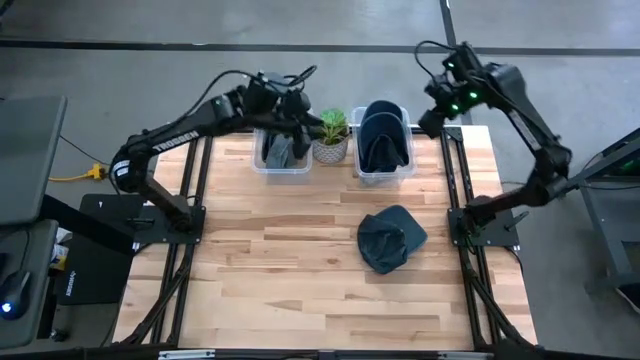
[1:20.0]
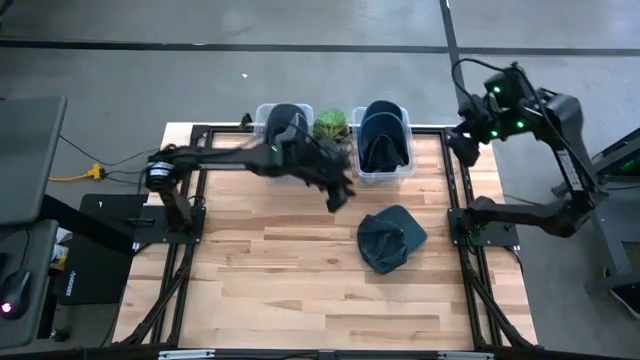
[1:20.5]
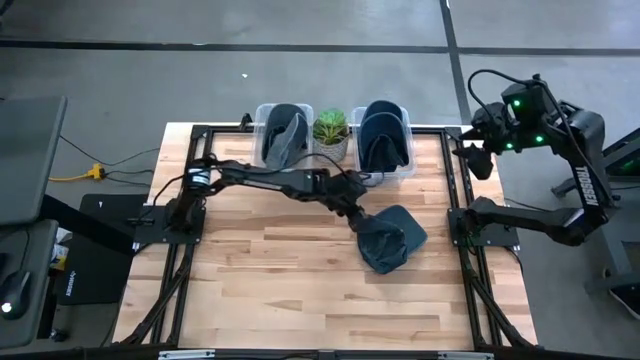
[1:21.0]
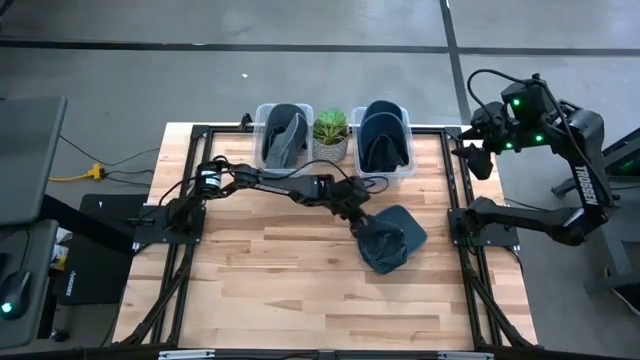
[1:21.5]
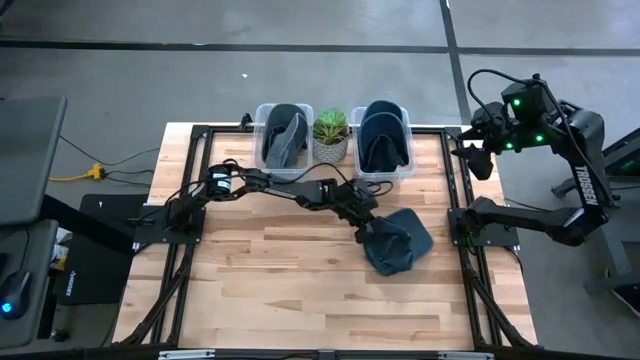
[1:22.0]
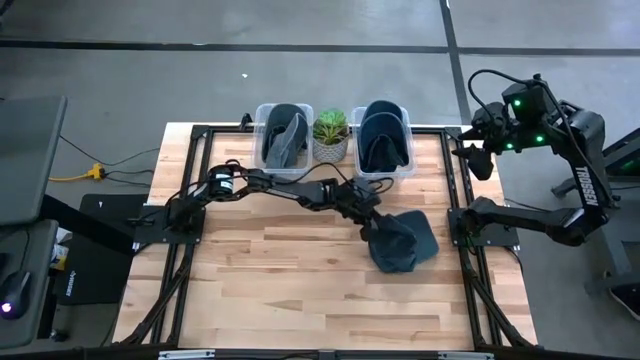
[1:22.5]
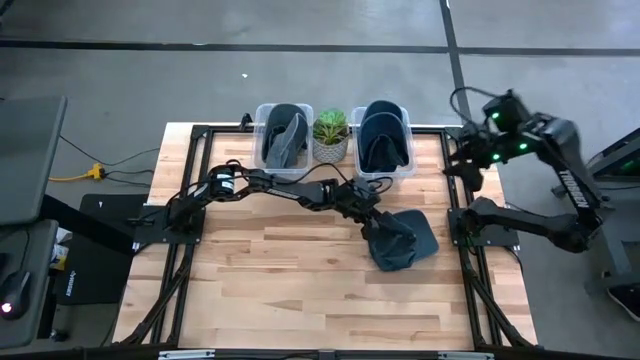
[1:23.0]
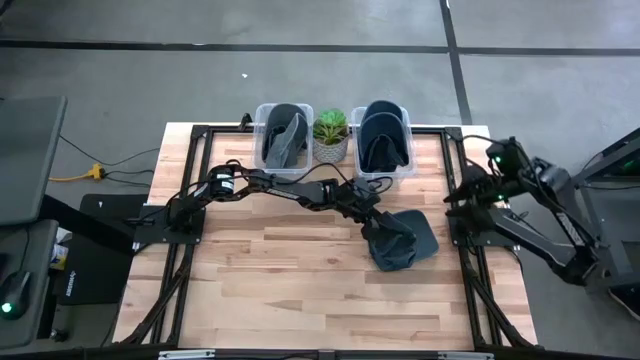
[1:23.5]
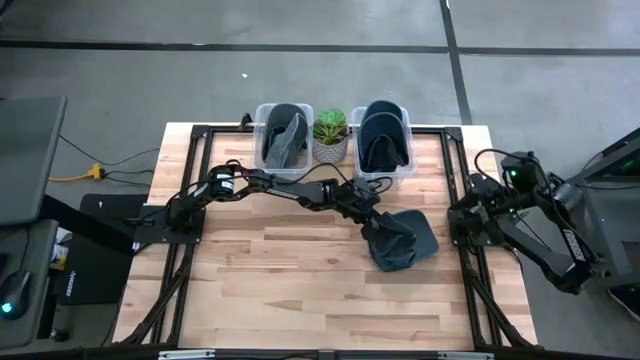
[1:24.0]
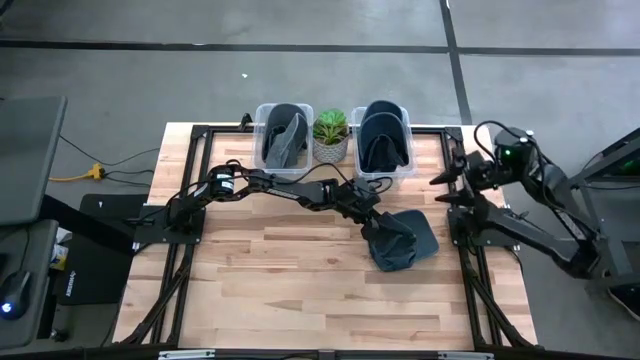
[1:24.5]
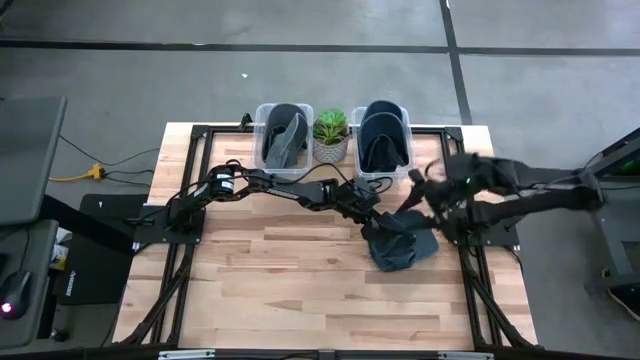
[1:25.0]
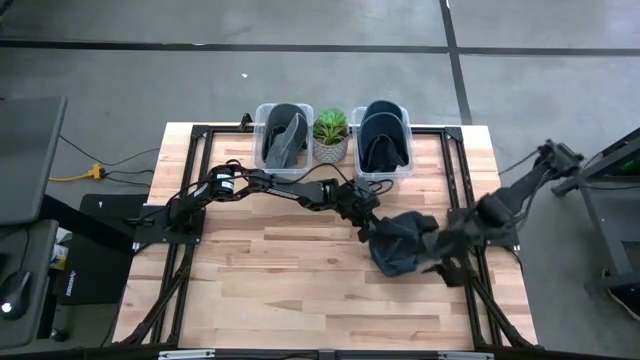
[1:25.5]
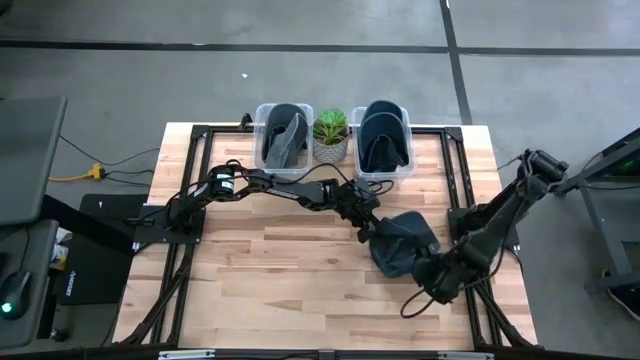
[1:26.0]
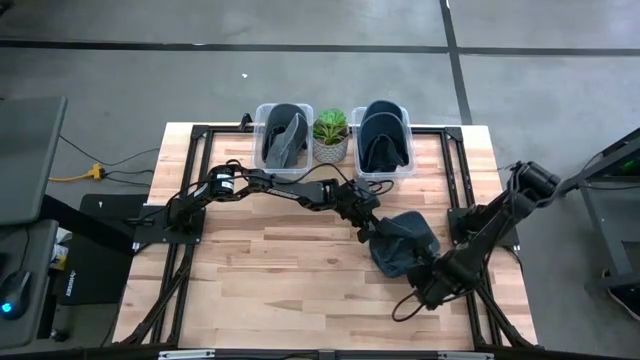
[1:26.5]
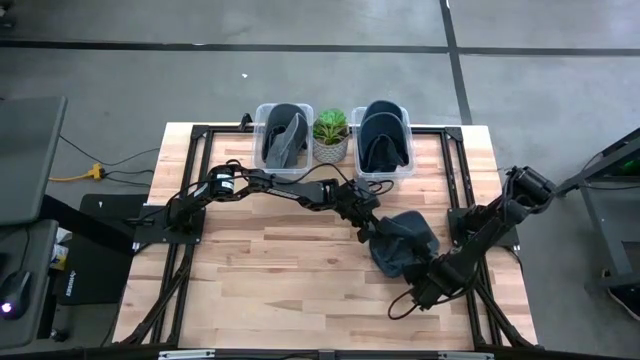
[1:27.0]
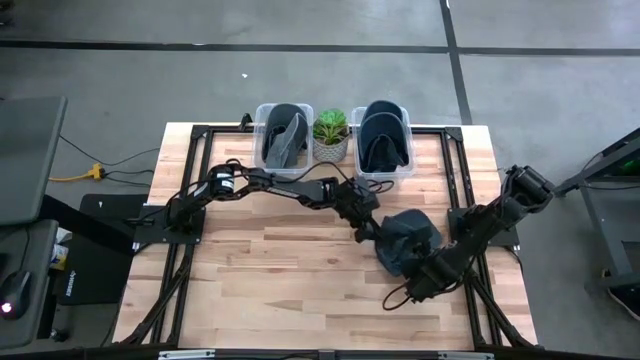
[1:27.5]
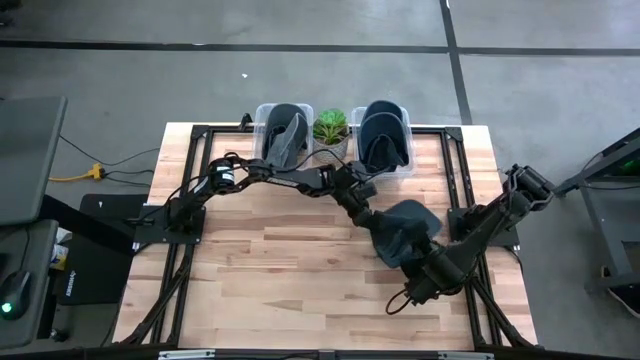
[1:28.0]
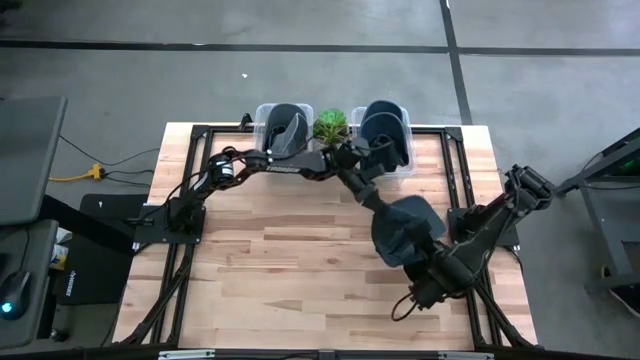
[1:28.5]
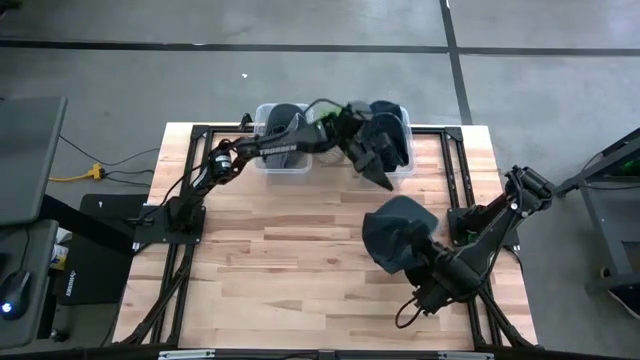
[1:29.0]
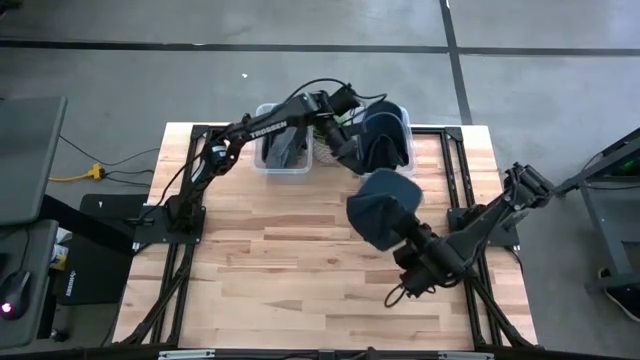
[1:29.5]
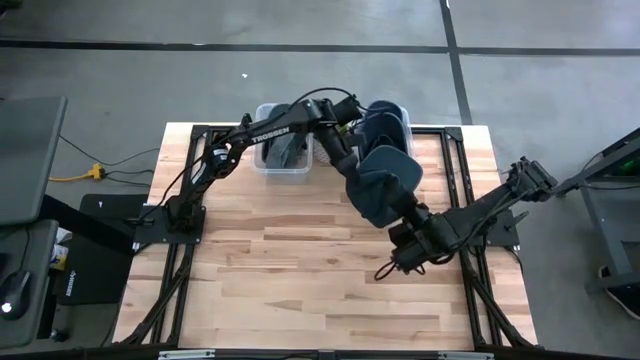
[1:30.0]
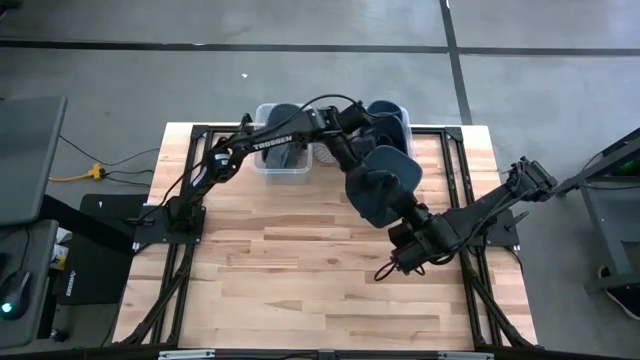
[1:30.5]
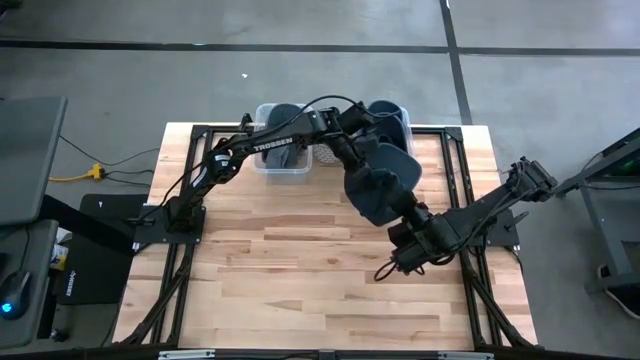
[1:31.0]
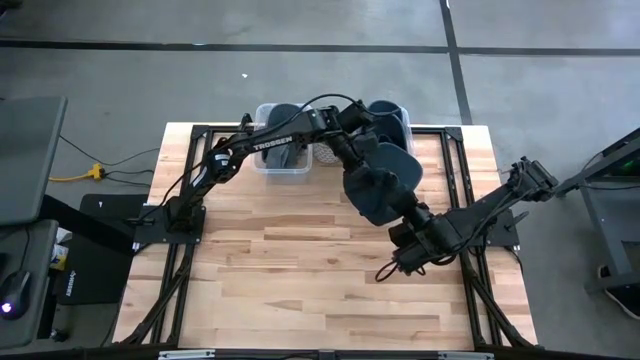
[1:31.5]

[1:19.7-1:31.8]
Task: Pick & Place hat
Put the blue cap into the right transparent bin

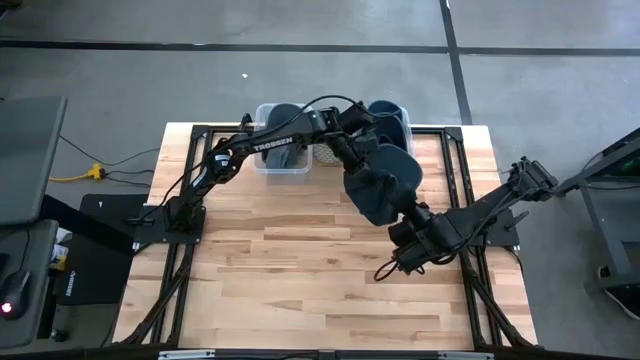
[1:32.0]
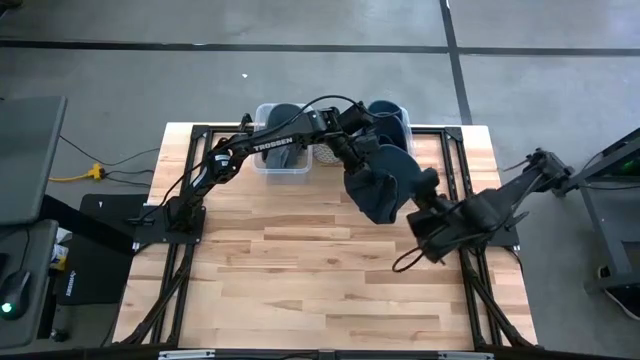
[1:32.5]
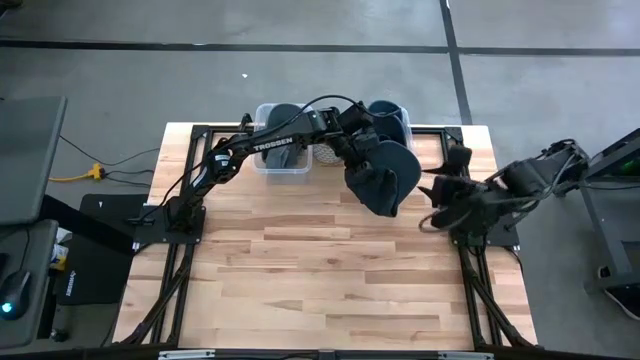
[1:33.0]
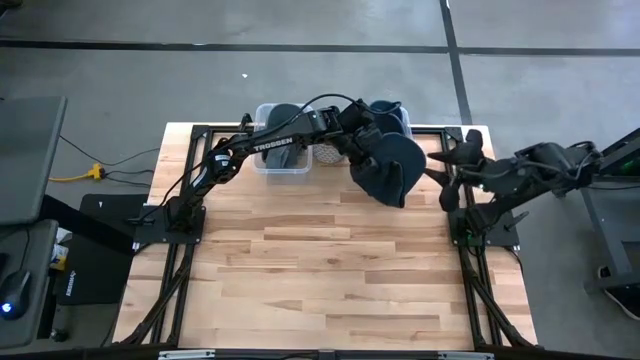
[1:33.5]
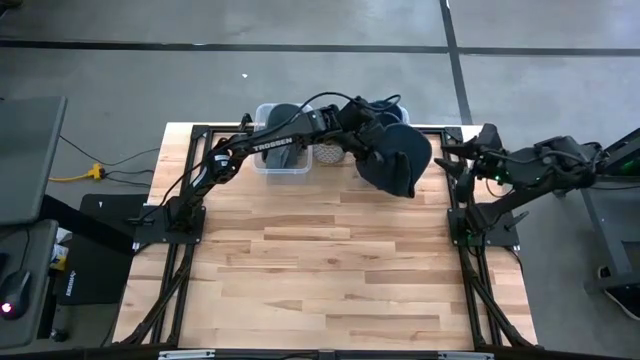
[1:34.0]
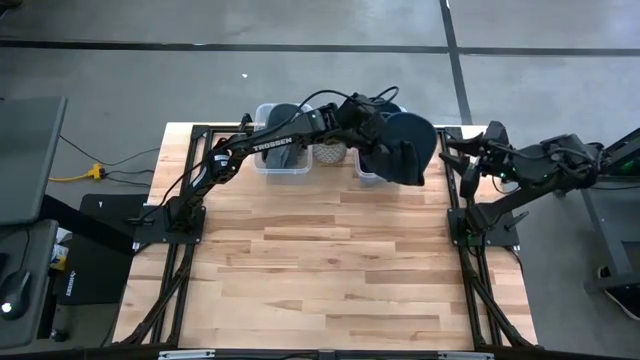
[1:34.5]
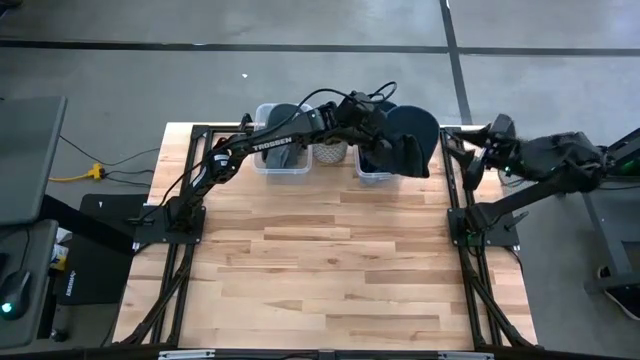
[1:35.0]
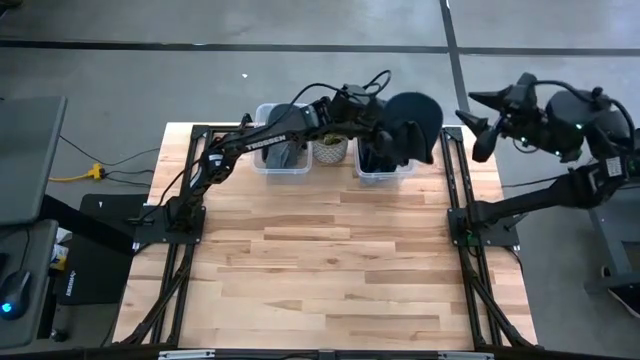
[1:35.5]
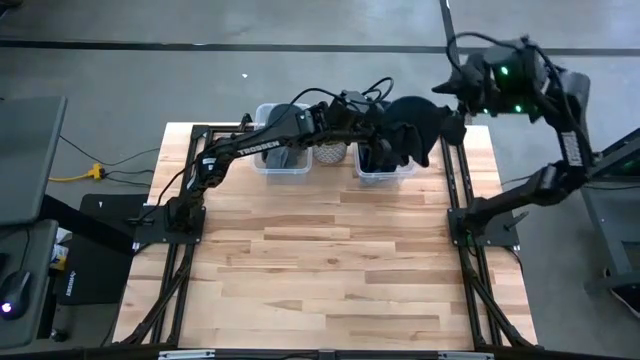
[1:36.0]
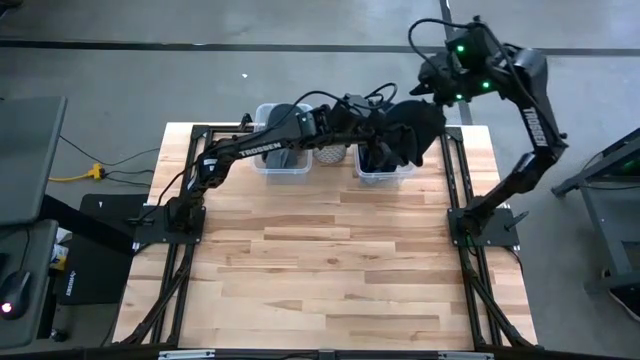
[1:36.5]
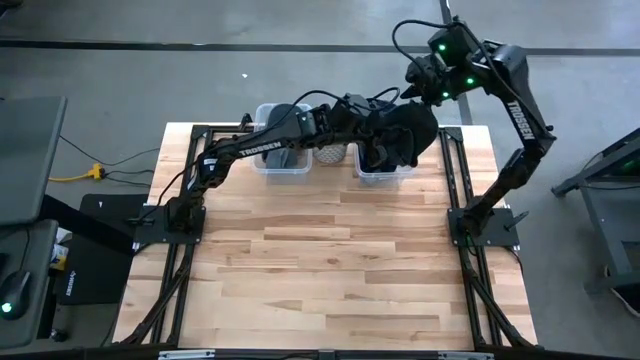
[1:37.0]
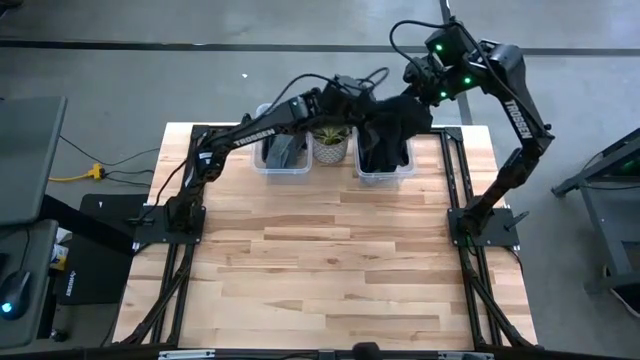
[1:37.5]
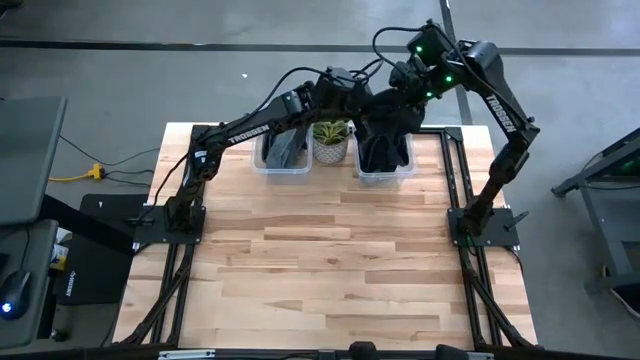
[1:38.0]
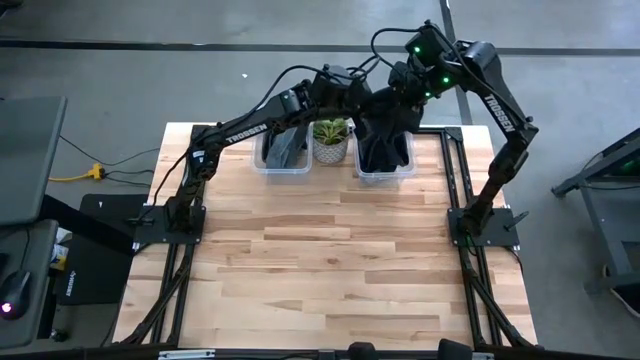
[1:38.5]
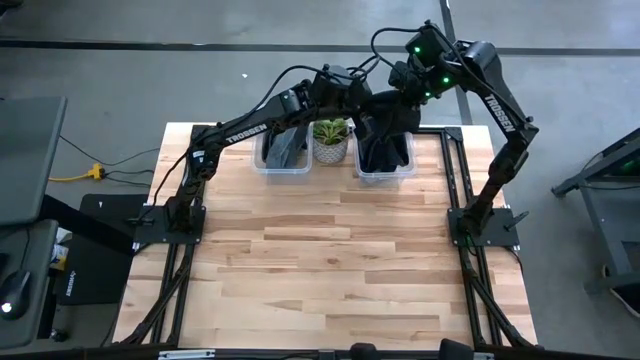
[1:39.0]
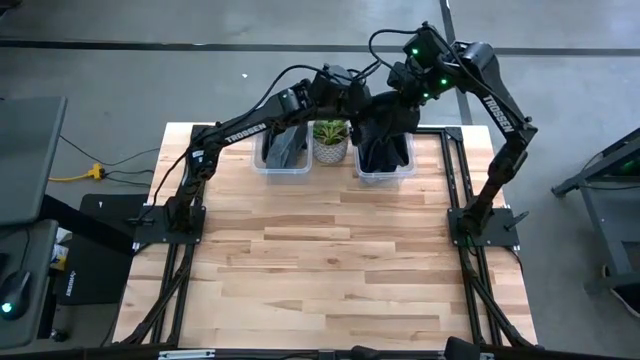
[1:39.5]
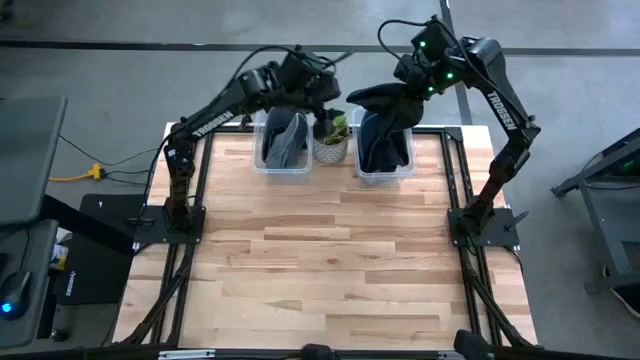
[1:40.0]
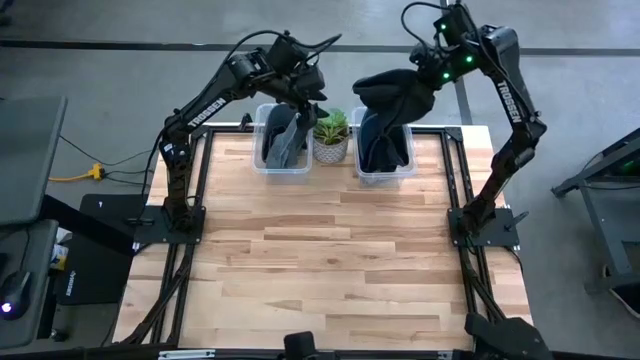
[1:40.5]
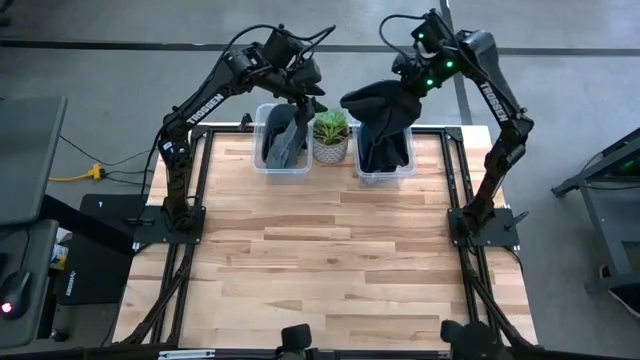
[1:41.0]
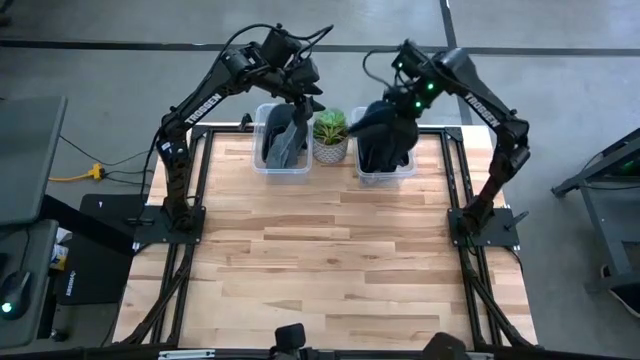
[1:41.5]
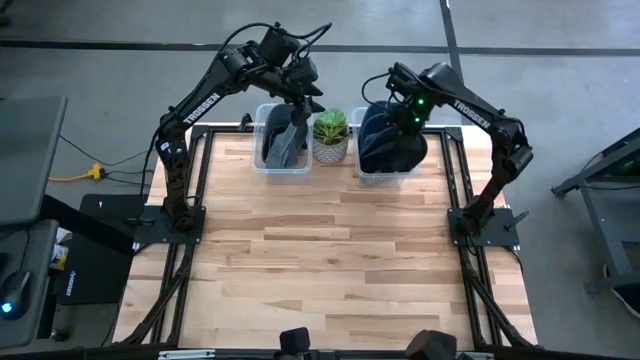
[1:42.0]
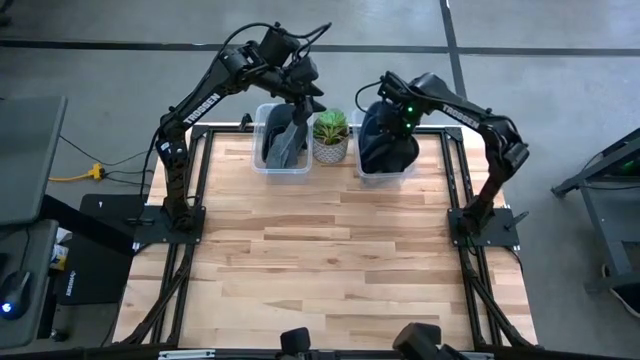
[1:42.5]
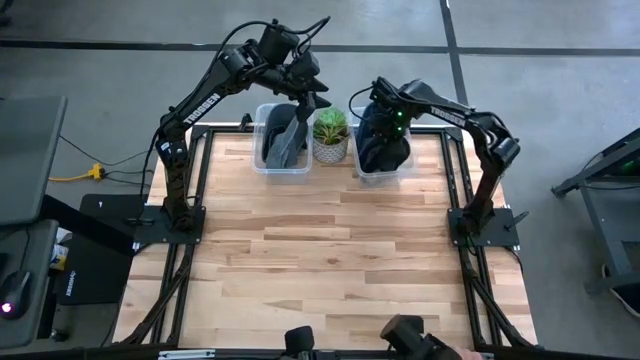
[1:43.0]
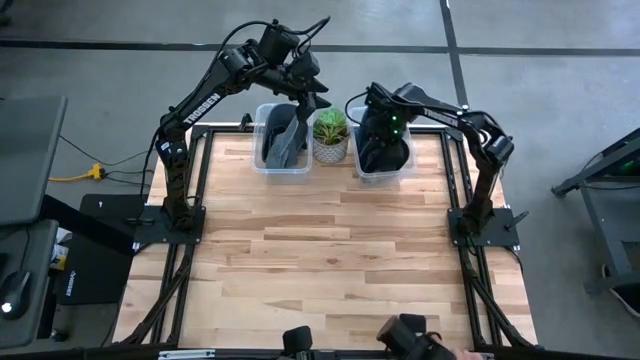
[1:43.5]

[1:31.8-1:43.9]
Put the blue cap into the right transparent bin
